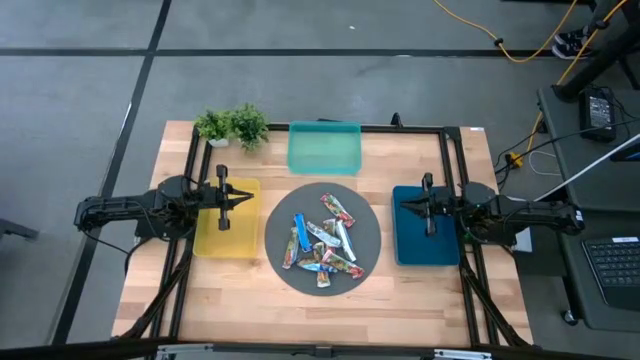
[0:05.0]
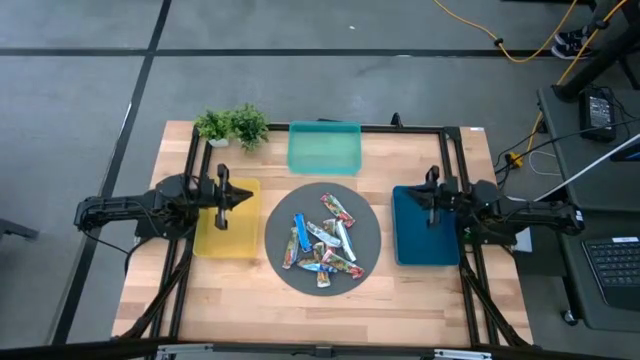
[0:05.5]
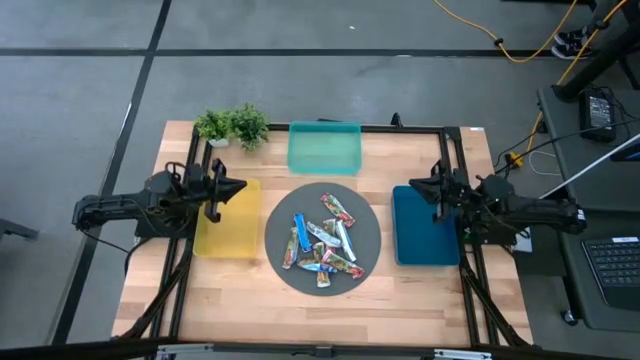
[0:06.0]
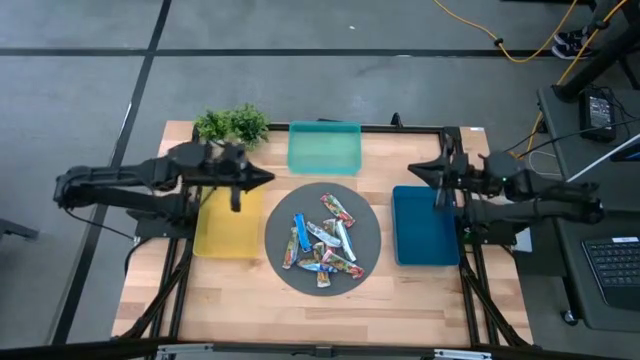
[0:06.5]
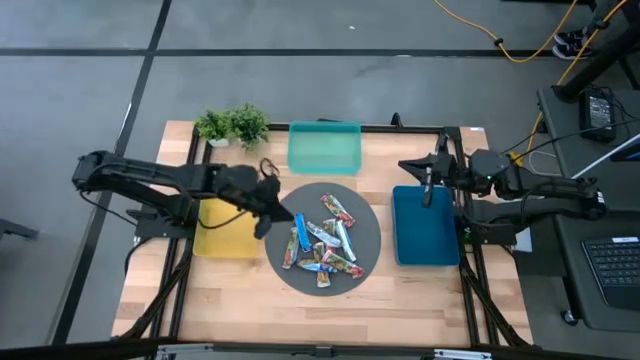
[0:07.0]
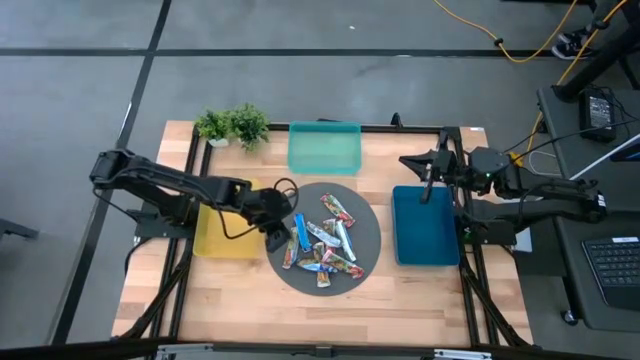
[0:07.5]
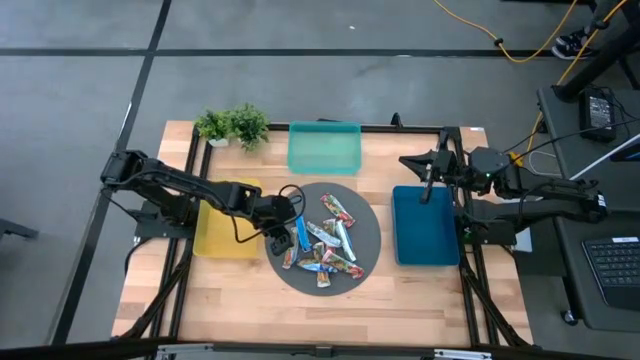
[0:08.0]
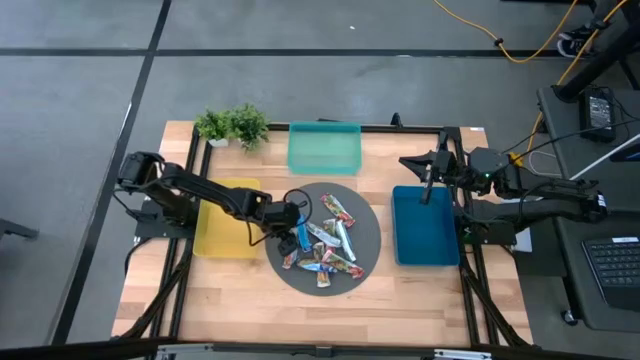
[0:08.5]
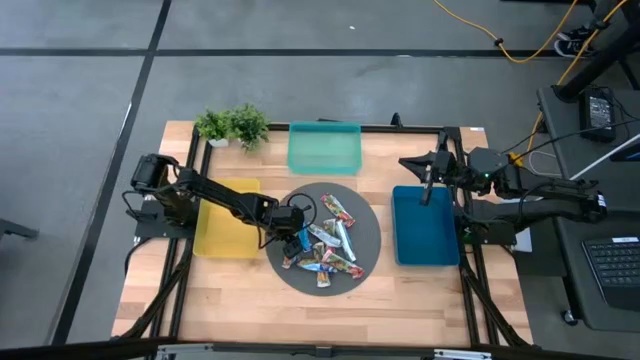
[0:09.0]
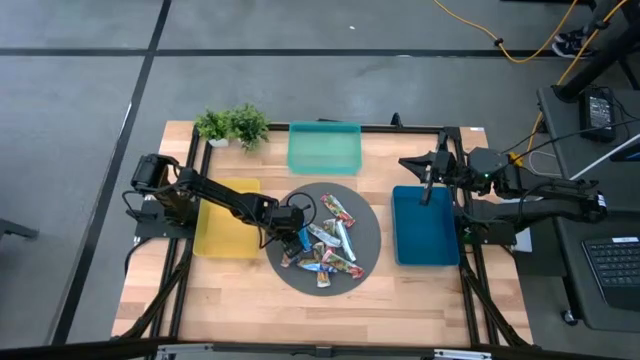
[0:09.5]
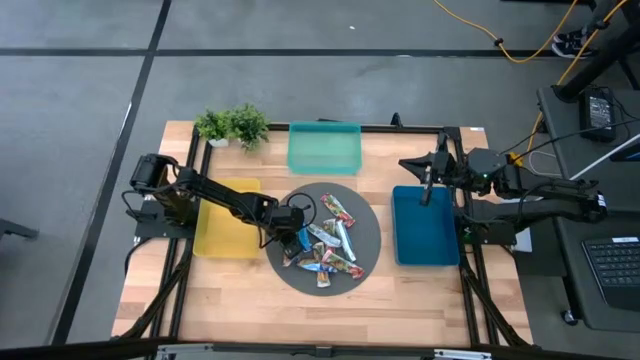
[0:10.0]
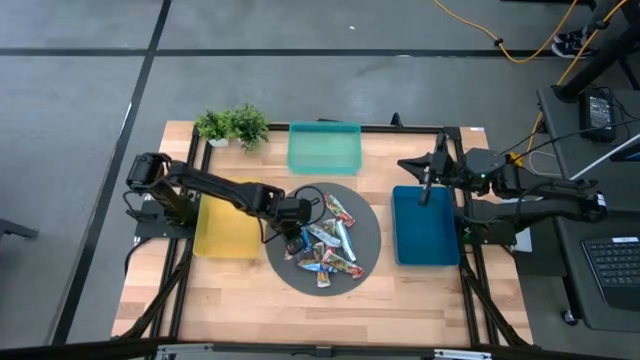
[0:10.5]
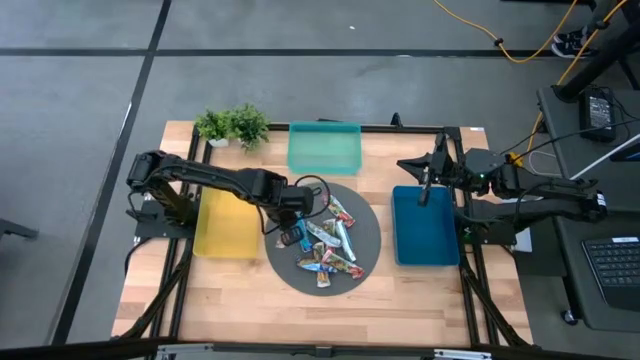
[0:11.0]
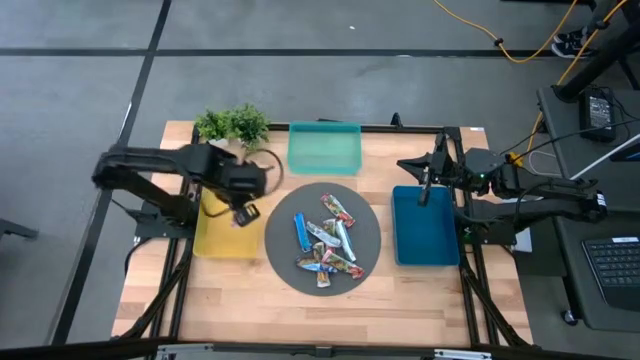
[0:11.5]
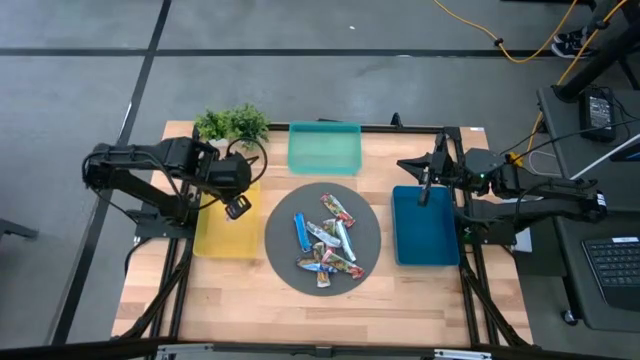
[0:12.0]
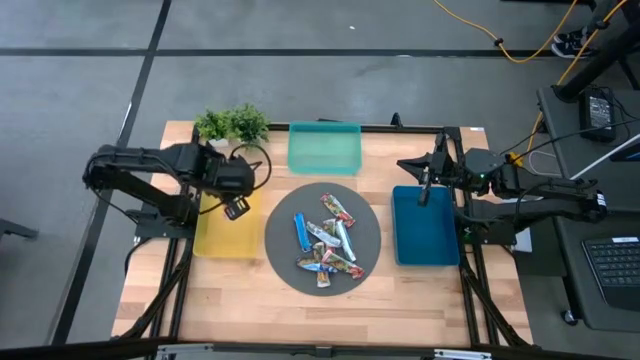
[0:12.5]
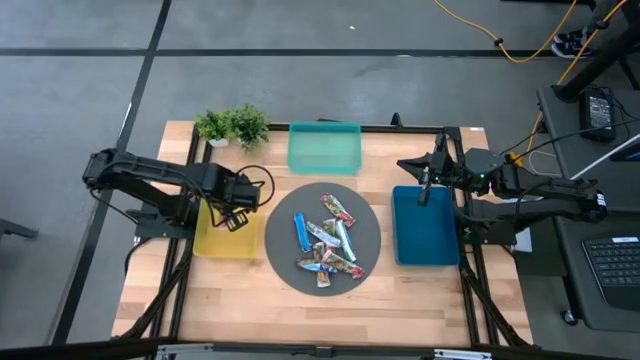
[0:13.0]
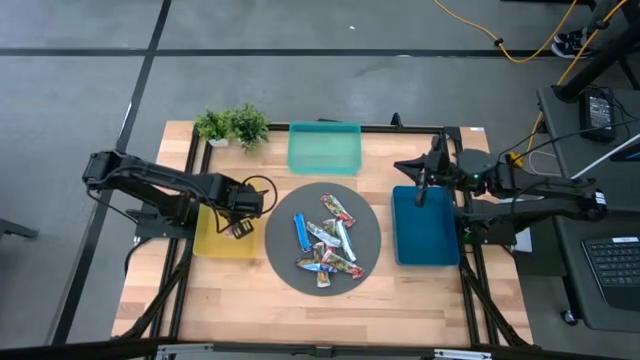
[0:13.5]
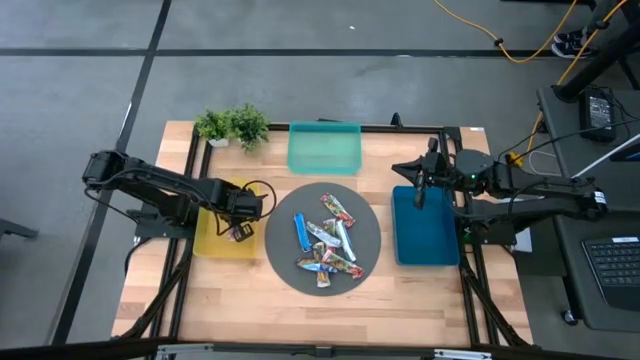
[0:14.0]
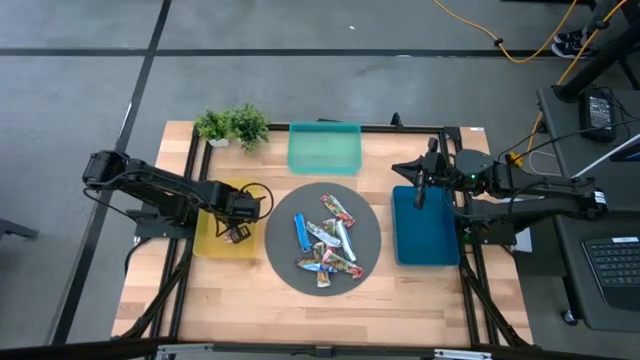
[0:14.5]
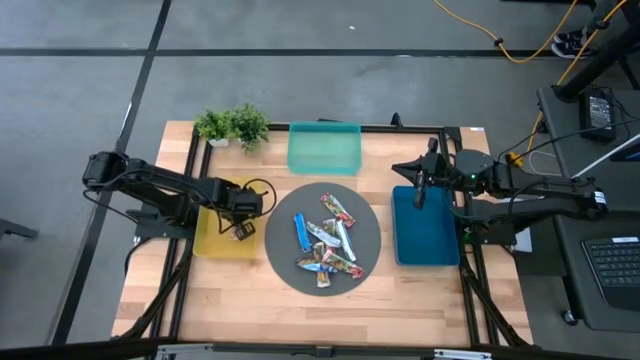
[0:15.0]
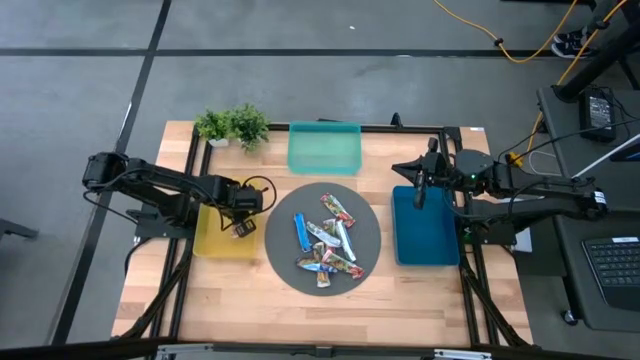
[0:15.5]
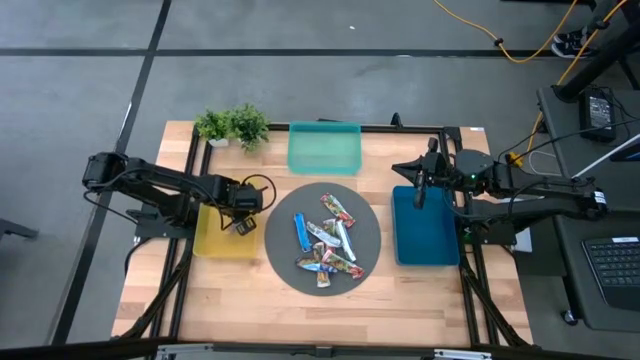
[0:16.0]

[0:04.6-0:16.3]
Task: Pick and place Granola Bars by type
Put the red granola bar into the yellow bin

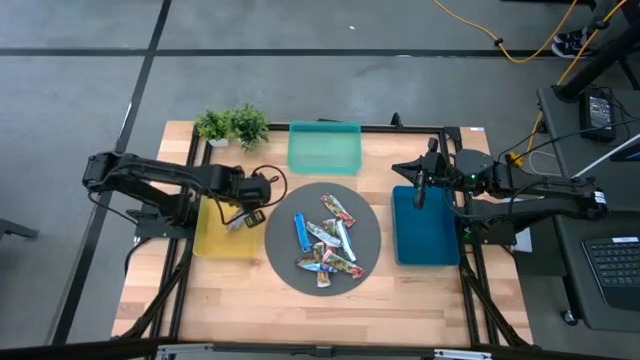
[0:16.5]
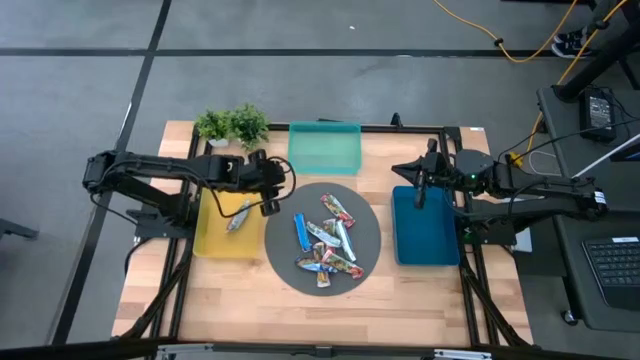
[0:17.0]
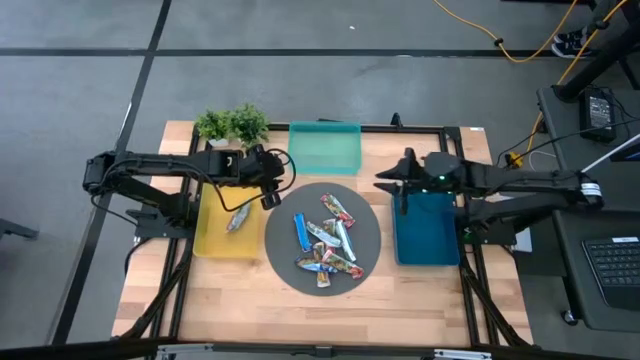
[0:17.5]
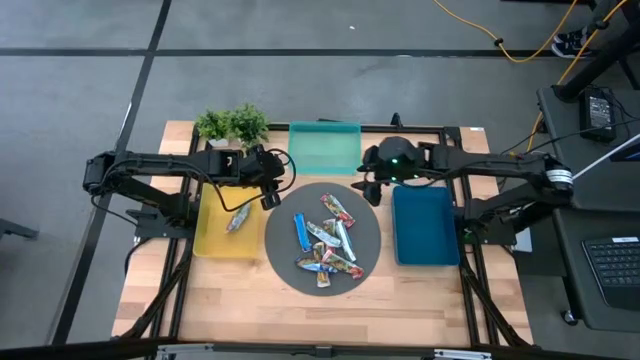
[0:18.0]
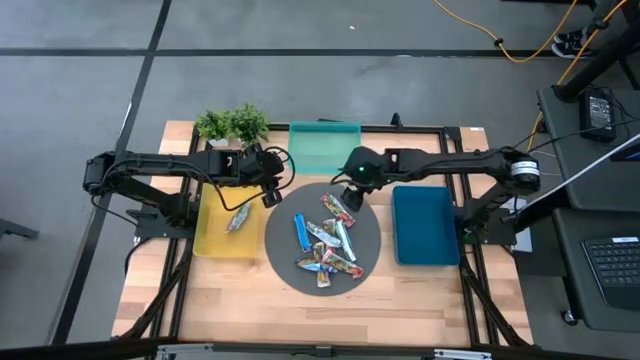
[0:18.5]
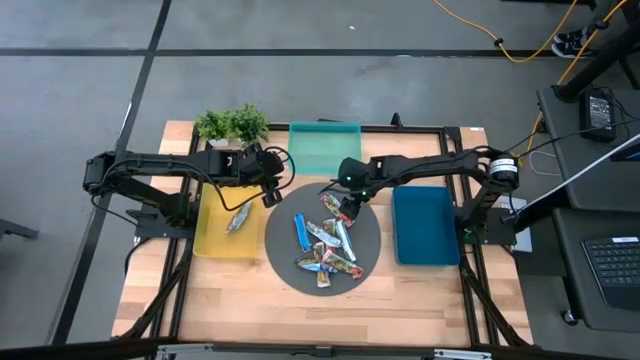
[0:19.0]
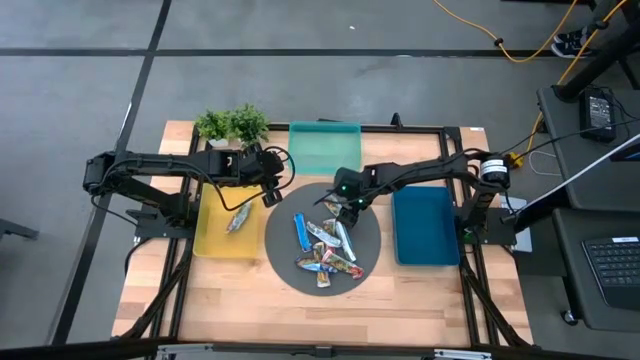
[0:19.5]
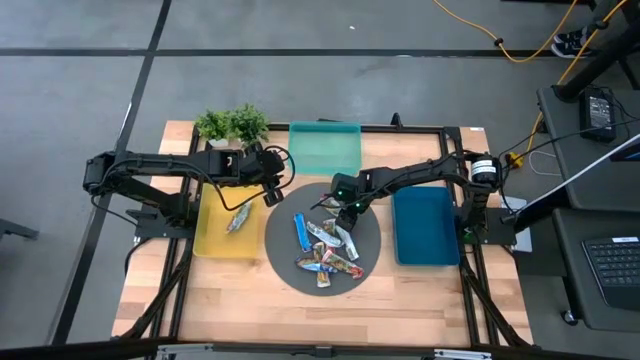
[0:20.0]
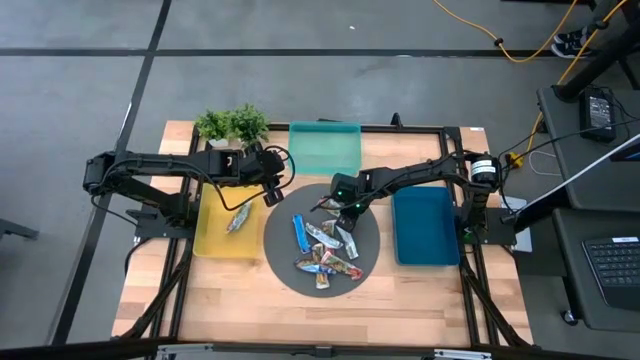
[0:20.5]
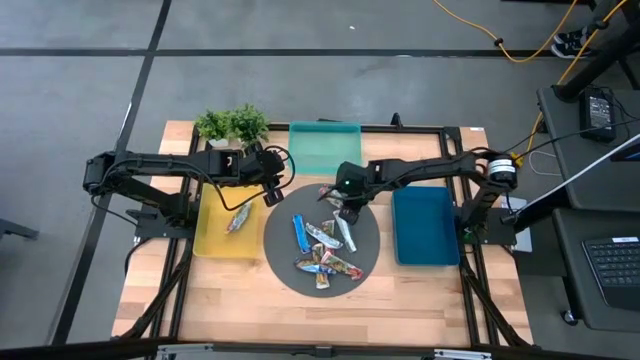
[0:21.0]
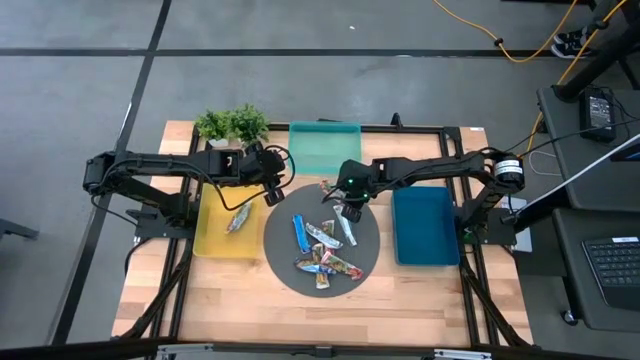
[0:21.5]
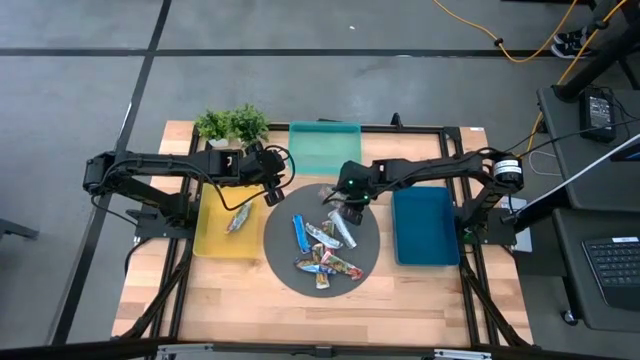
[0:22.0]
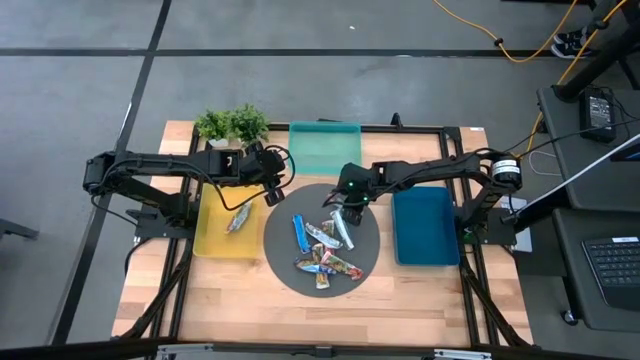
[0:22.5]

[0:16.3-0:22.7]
Put the red granola bar into the yellow bin

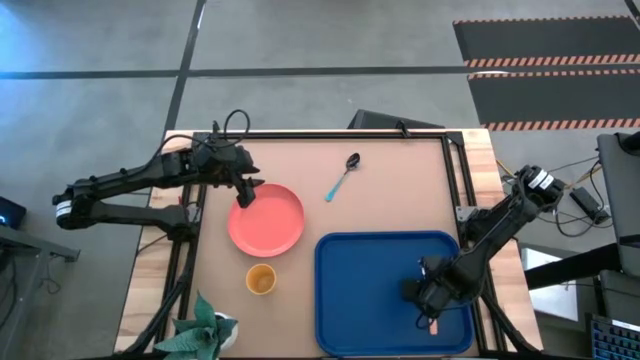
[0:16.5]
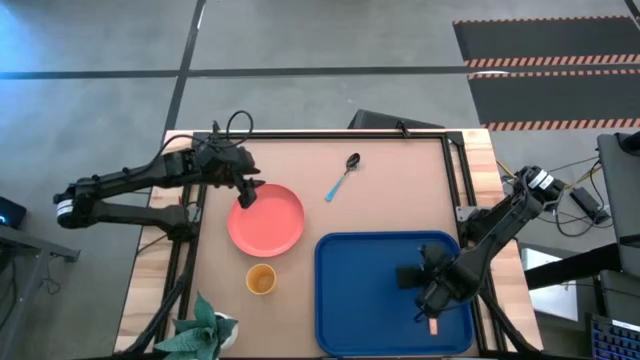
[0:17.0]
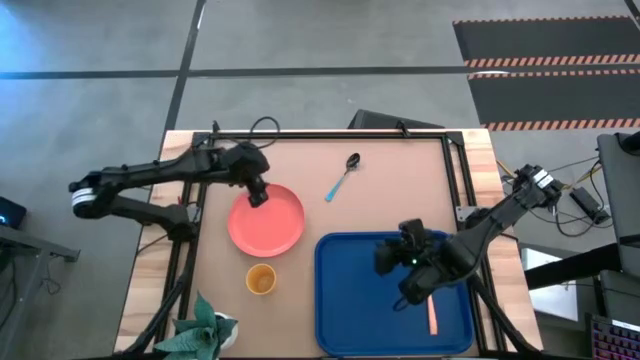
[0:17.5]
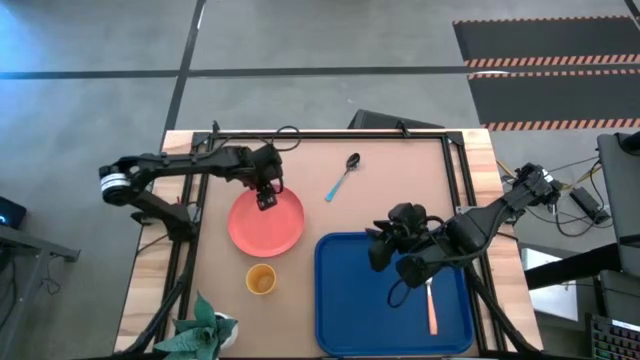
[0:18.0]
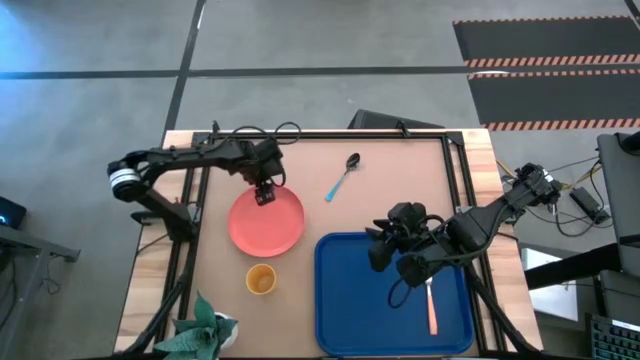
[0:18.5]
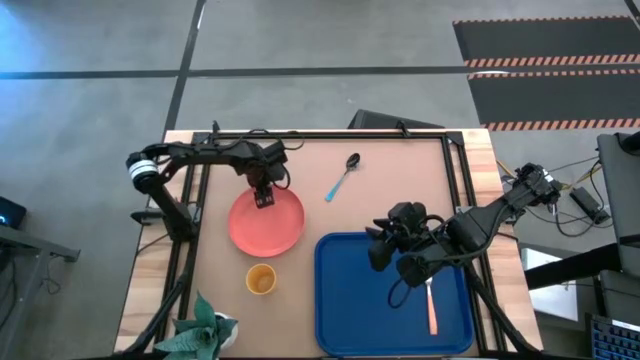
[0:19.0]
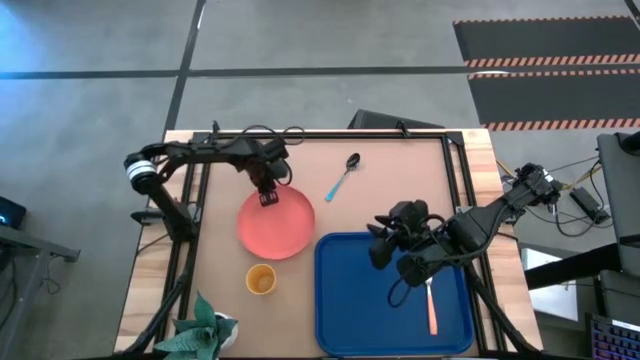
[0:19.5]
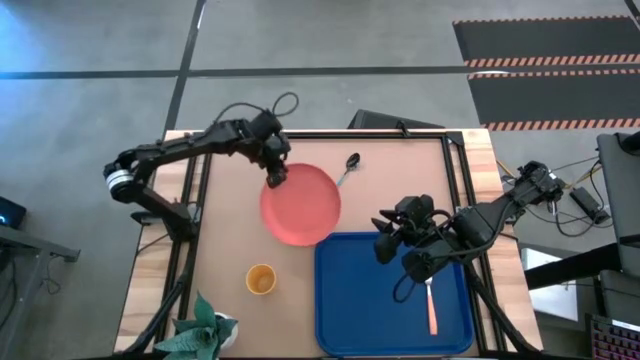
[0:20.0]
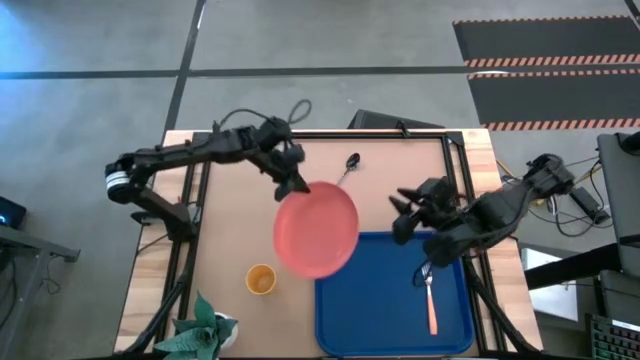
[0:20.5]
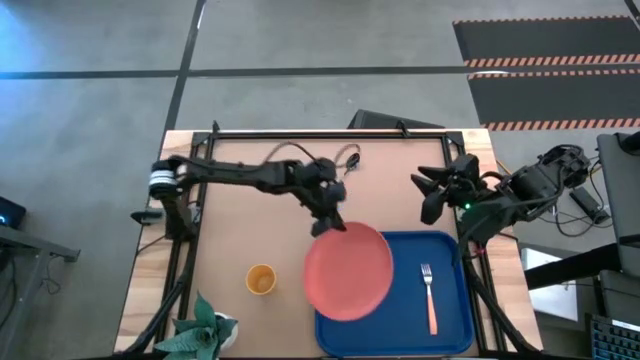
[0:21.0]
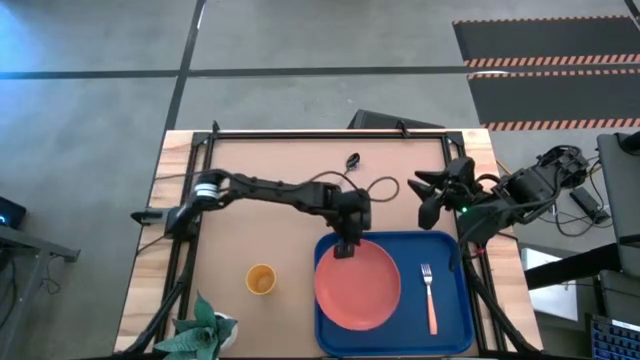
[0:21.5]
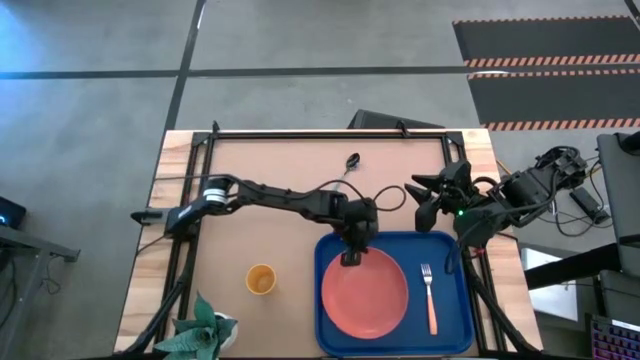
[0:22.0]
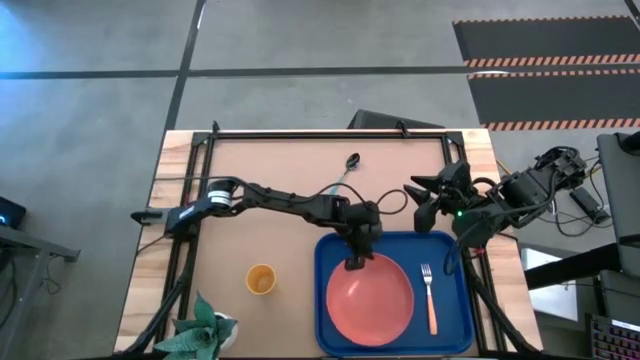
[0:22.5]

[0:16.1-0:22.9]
Task: Pick and place plate/cup/fork/spoon on tray
Put the orange plate on the blue tray
